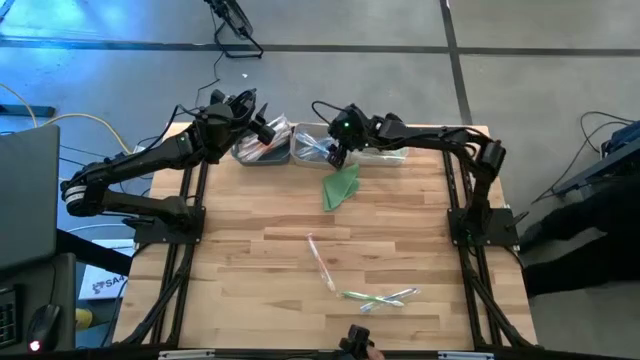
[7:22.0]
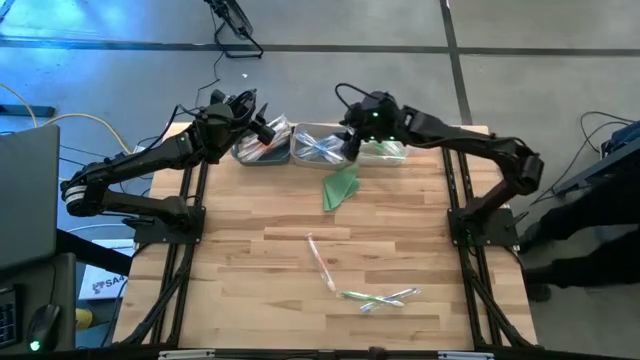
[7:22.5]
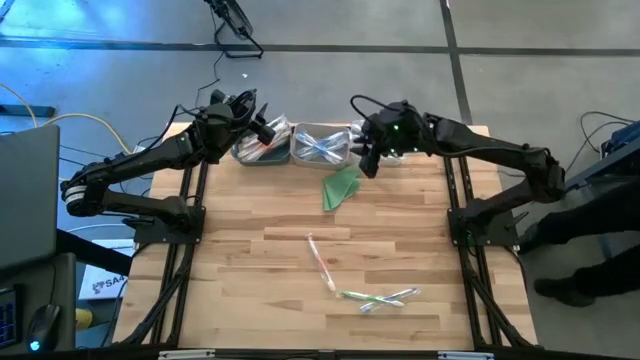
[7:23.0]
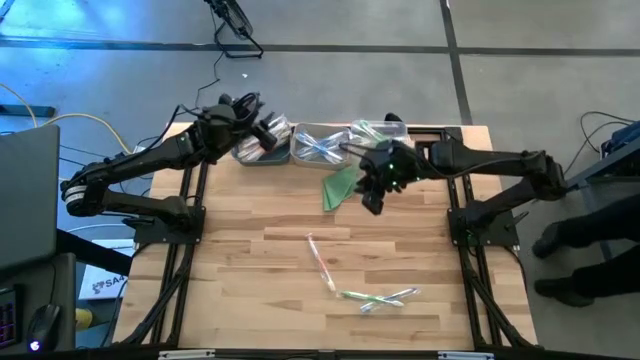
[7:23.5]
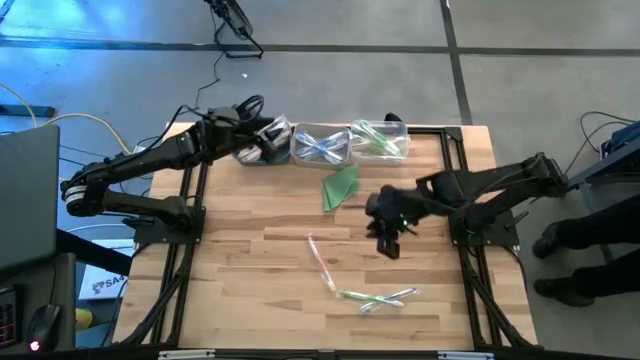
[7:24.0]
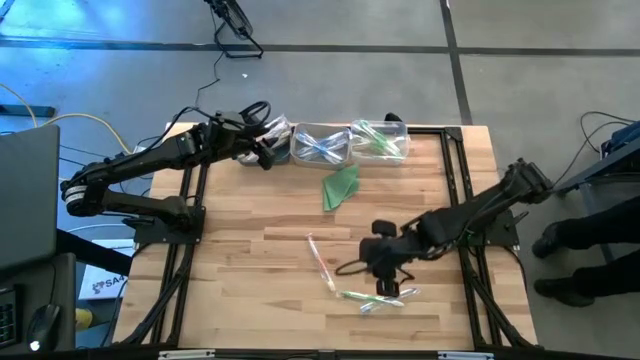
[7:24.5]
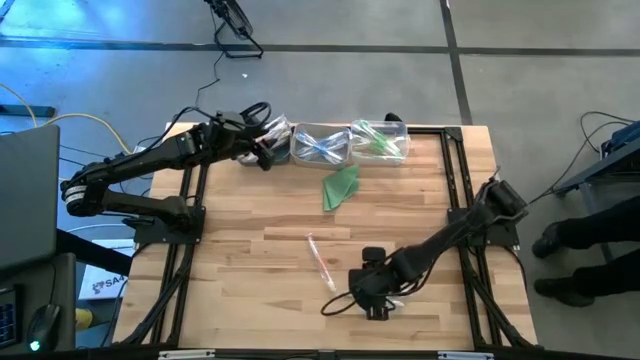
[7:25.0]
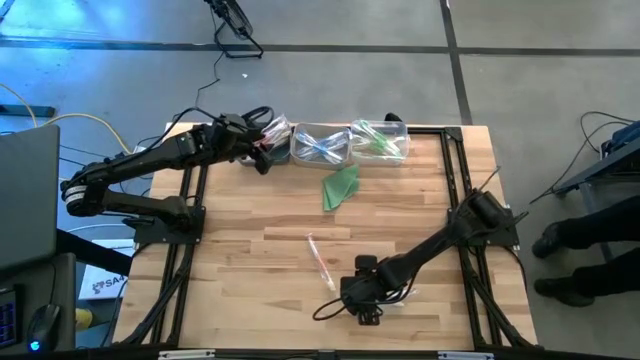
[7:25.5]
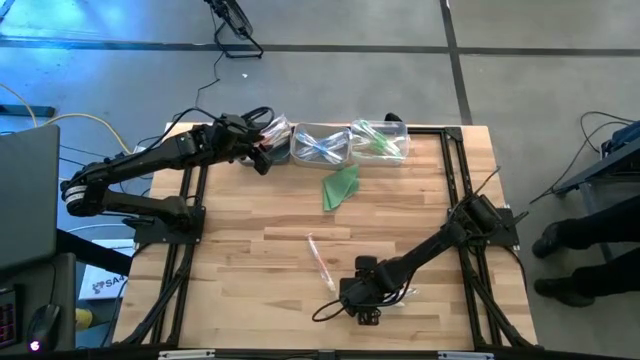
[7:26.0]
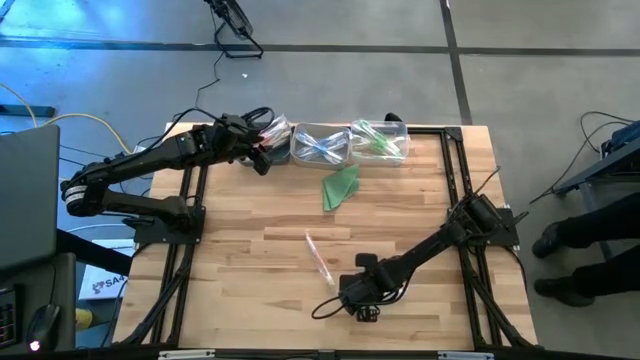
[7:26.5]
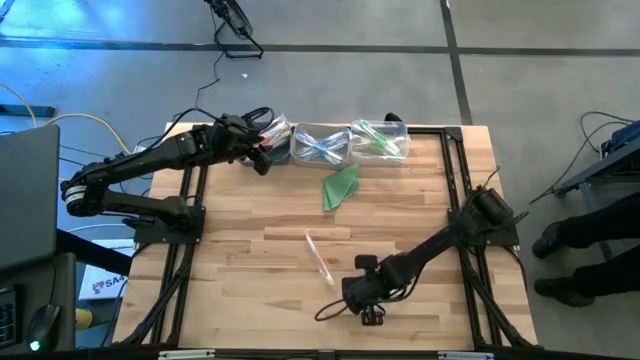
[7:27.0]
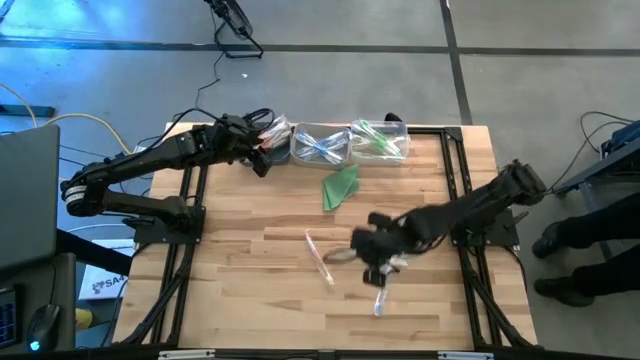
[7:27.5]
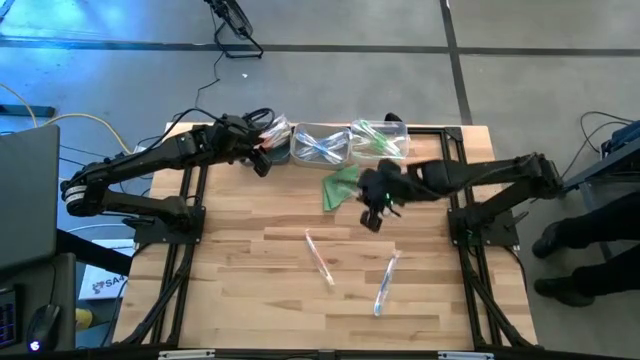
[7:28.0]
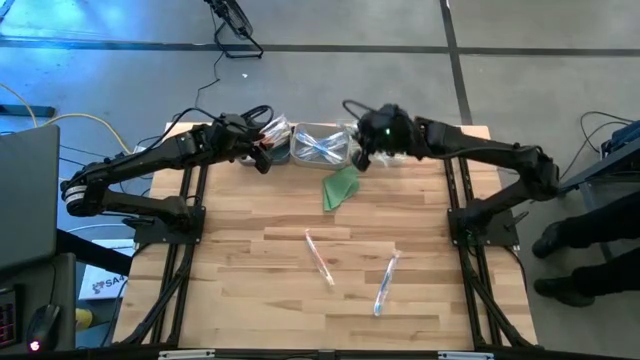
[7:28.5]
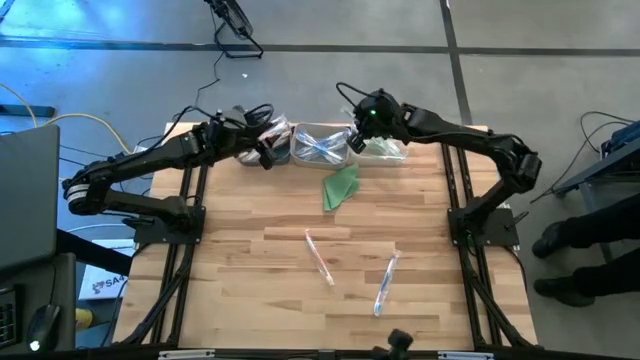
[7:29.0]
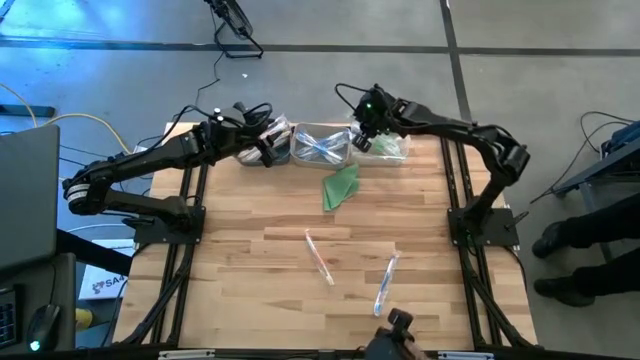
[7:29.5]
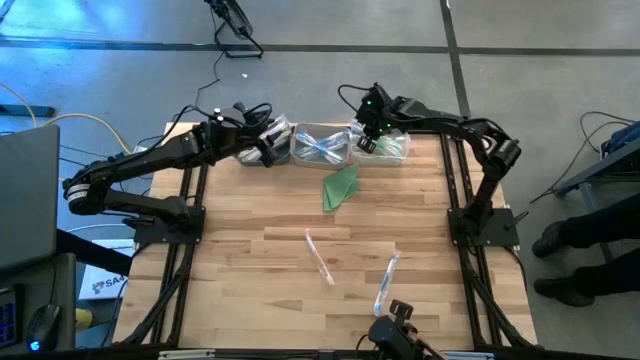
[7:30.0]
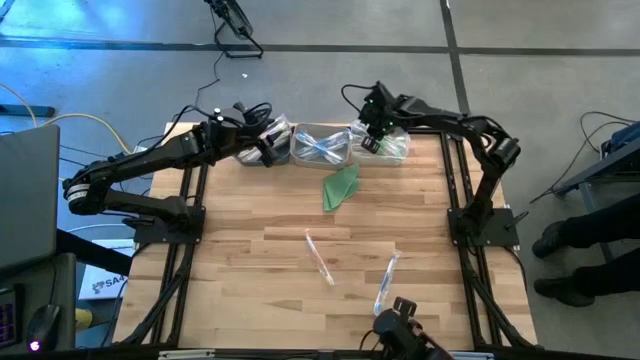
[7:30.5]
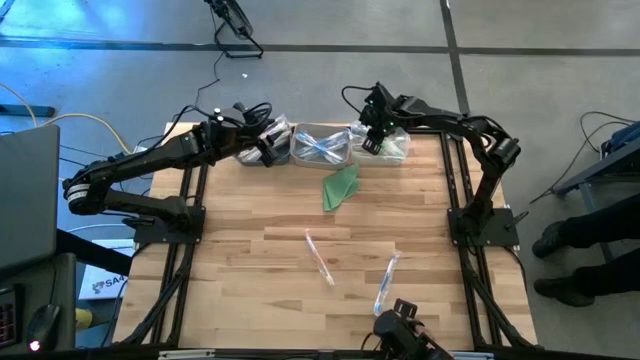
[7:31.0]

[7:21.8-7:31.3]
Task: Pick & Place Toothbrushes
Put the green toothbrush into the transparent bin

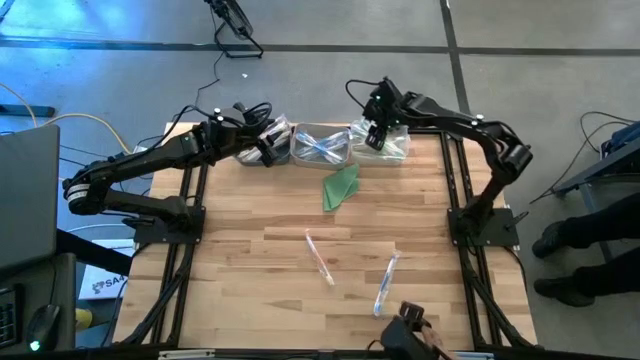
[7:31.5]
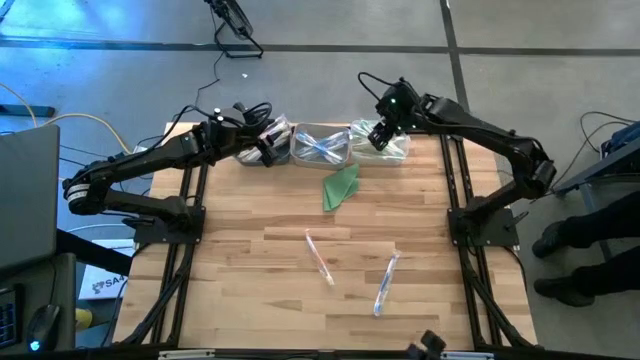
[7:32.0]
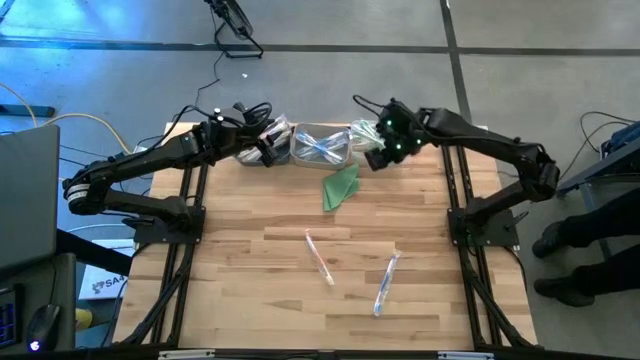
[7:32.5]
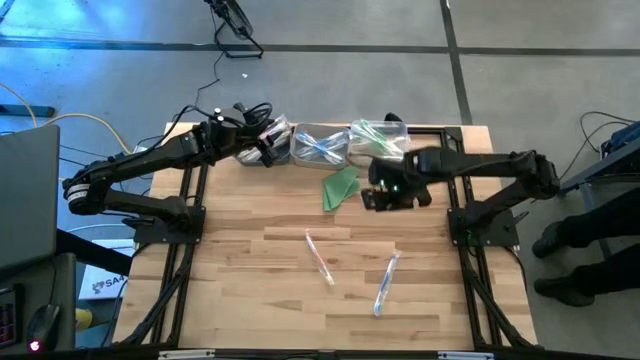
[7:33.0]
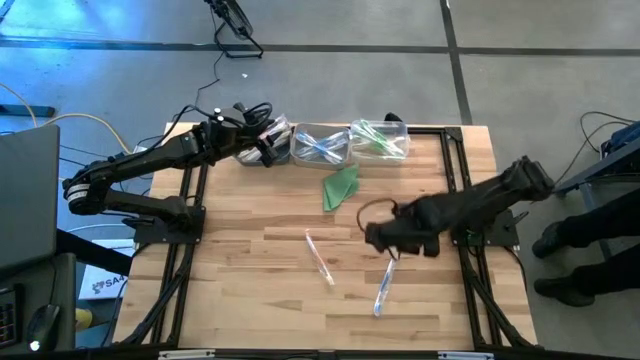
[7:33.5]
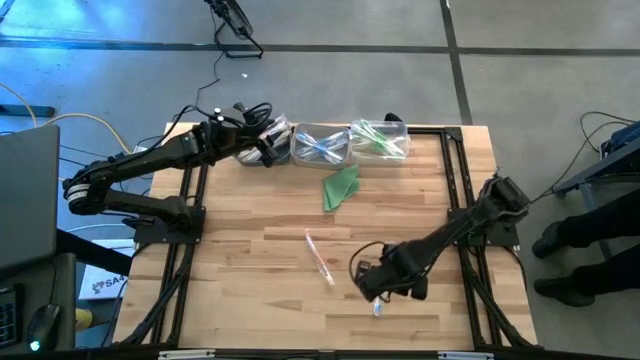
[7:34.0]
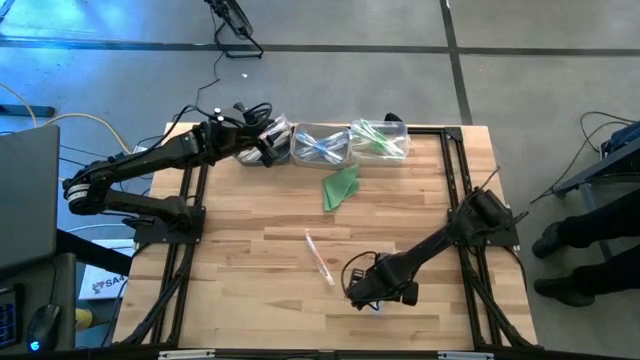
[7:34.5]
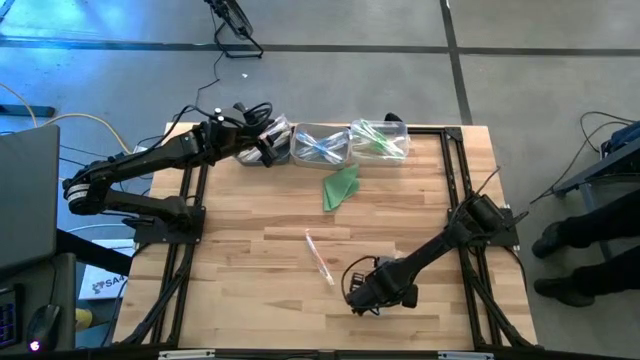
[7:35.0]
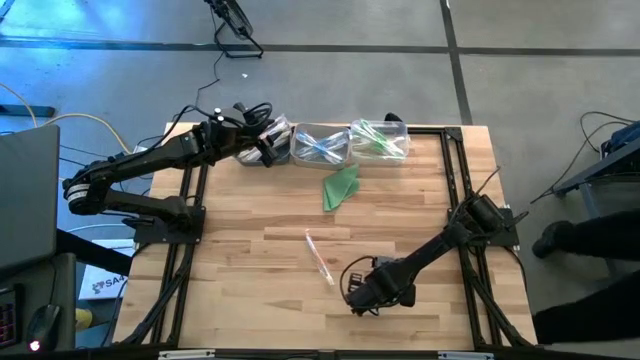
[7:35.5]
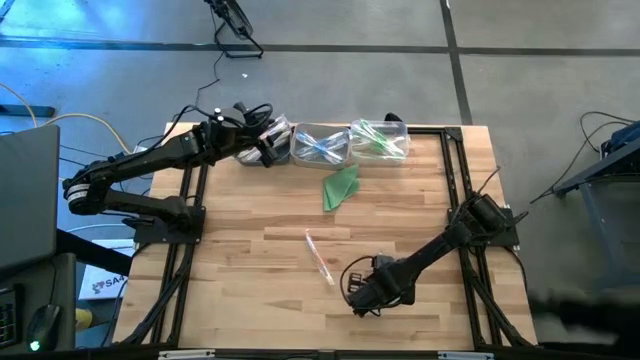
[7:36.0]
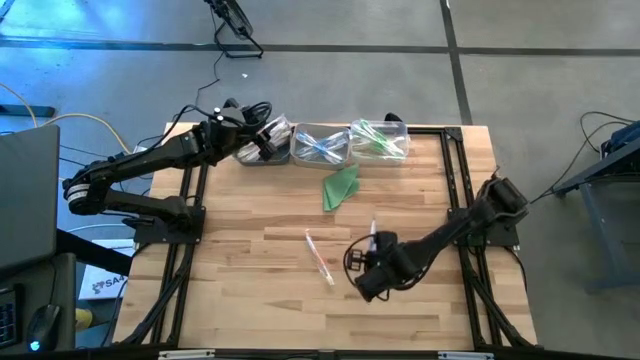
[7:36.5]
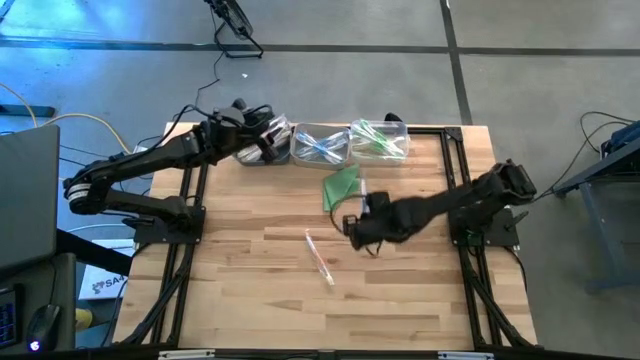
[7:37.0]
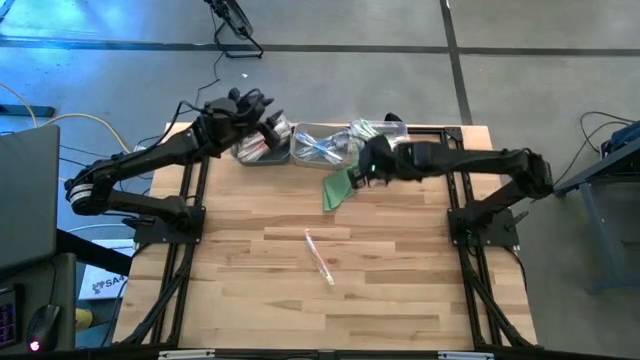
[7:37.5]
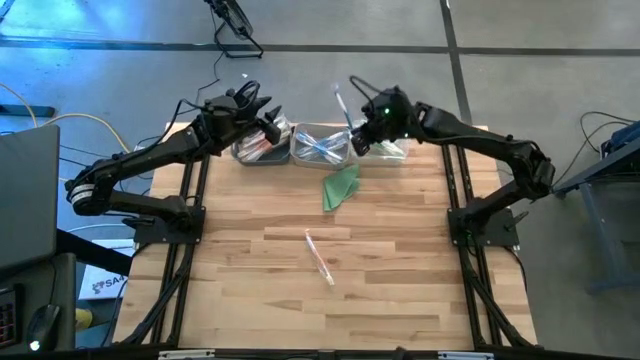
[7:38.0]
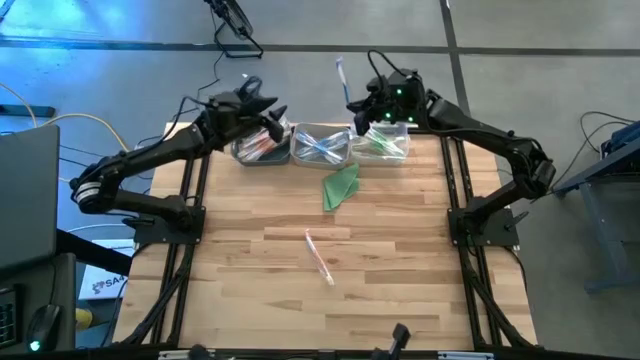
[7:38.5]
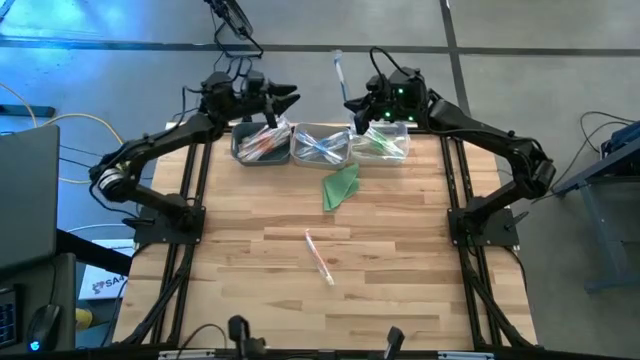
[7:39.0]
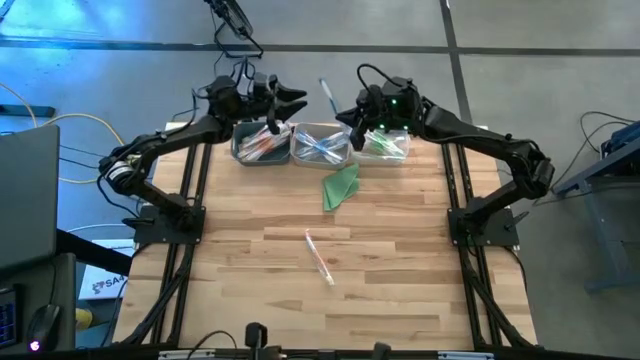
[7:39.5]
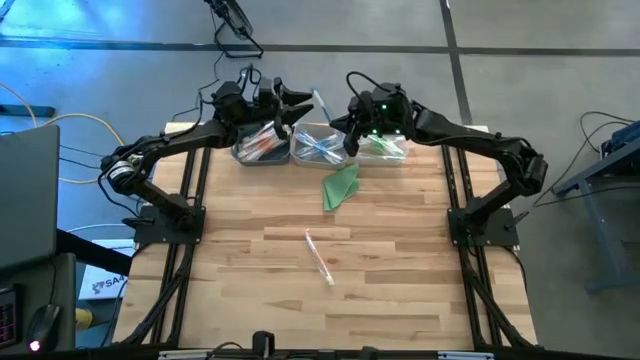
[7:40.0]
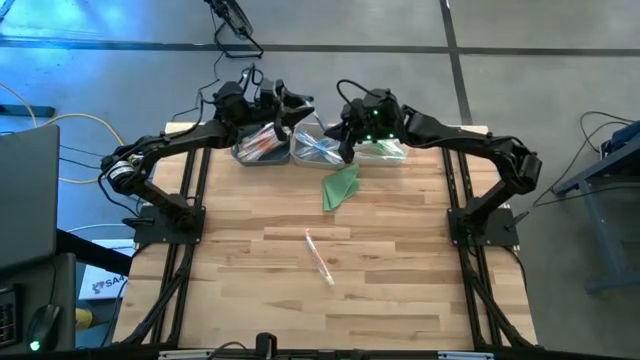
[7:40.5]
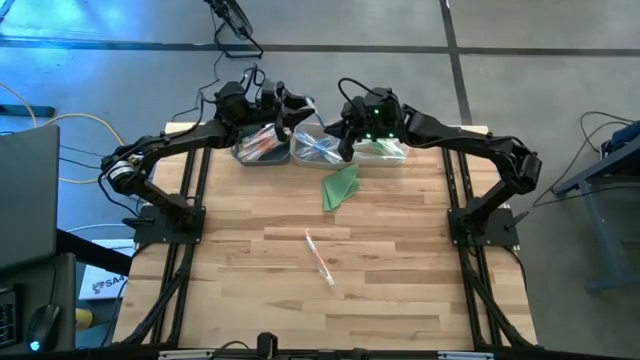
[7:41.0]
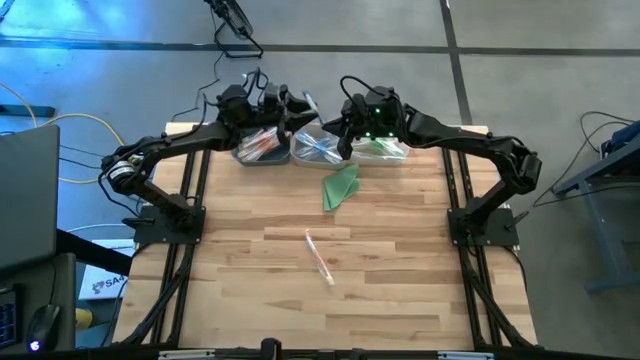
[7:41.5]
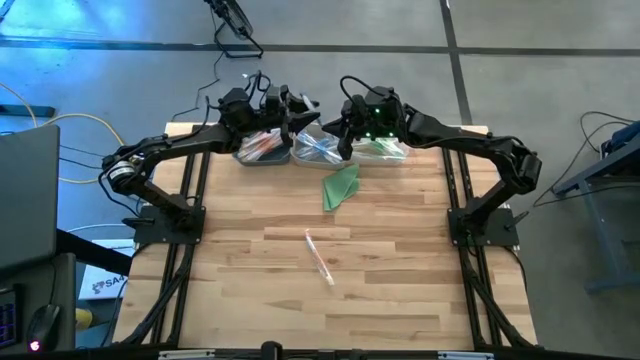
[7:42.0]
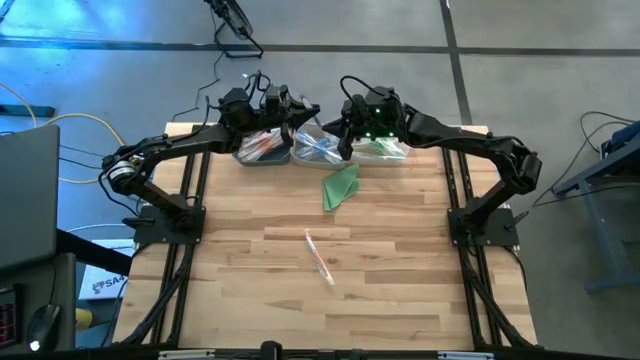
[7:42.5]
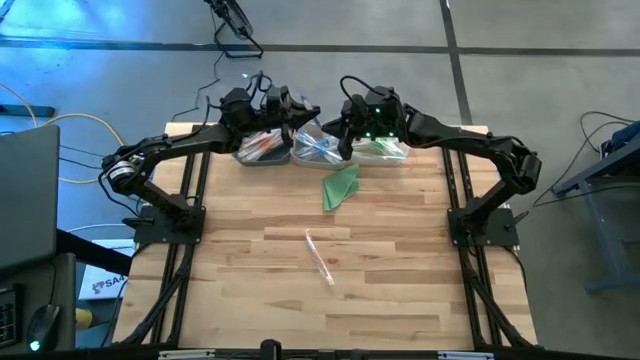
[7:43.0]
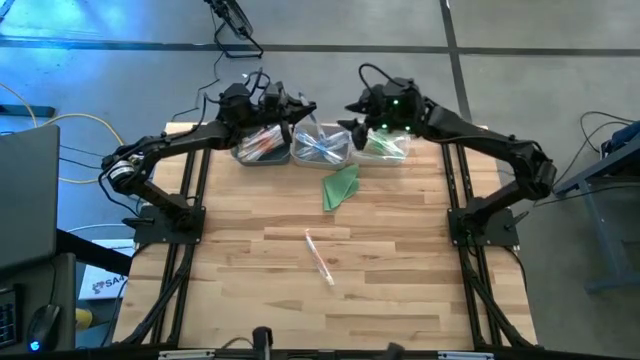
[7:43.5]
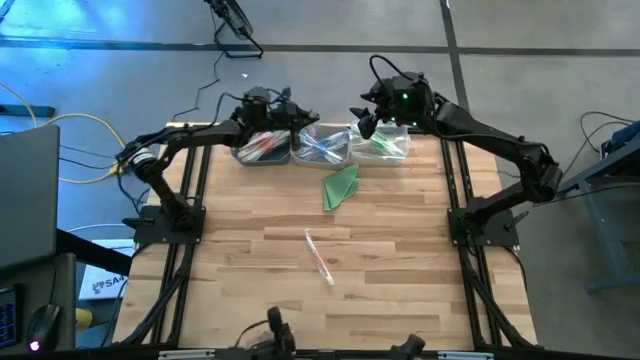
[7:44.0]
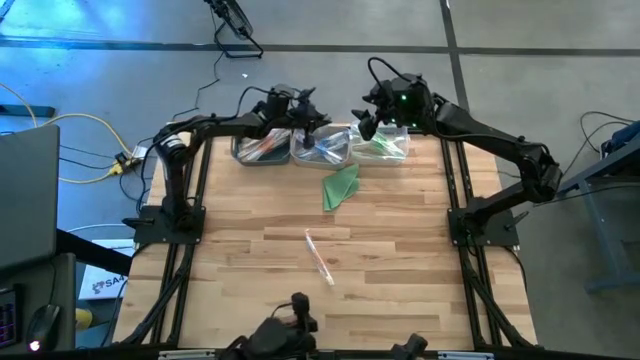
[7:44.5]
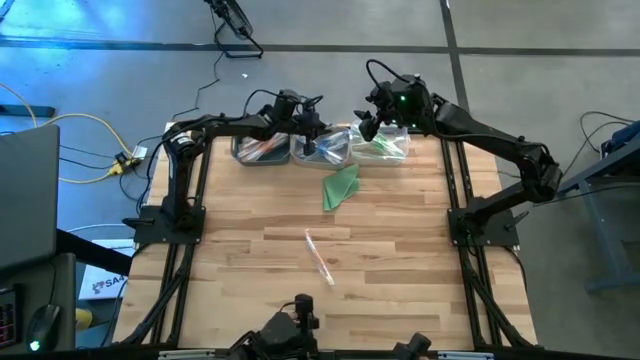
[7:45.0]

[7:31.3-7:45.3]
Put the blue toothbrush into the gray bin
